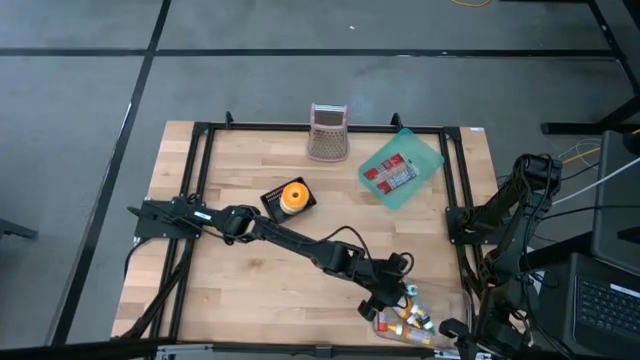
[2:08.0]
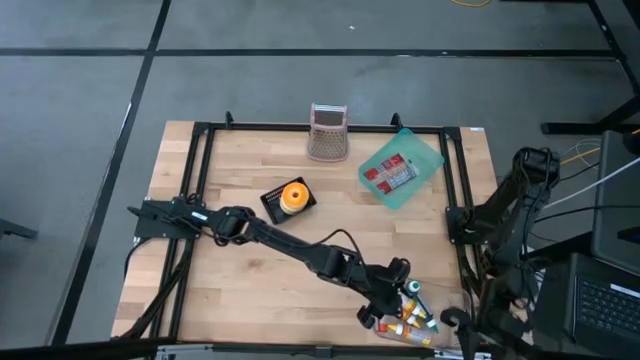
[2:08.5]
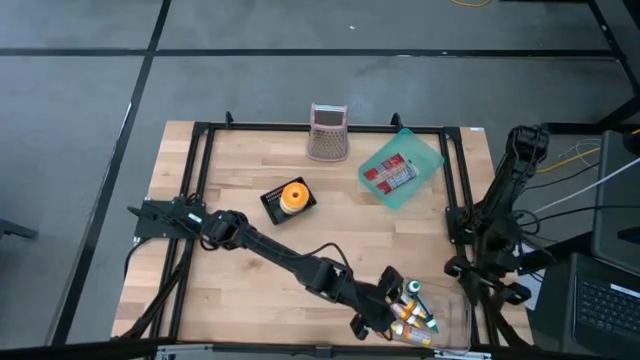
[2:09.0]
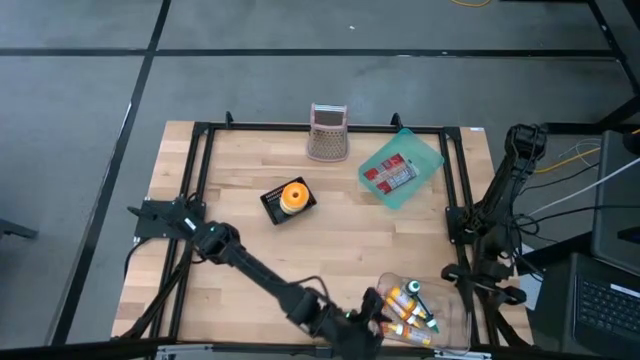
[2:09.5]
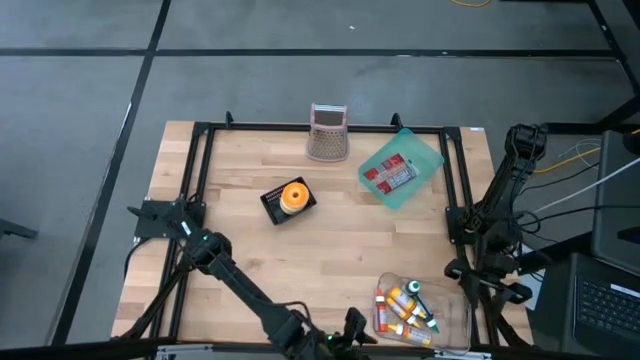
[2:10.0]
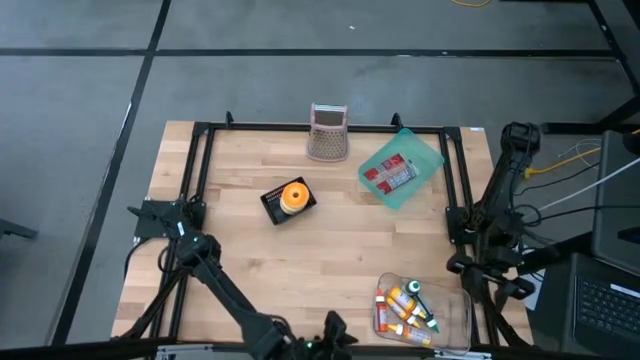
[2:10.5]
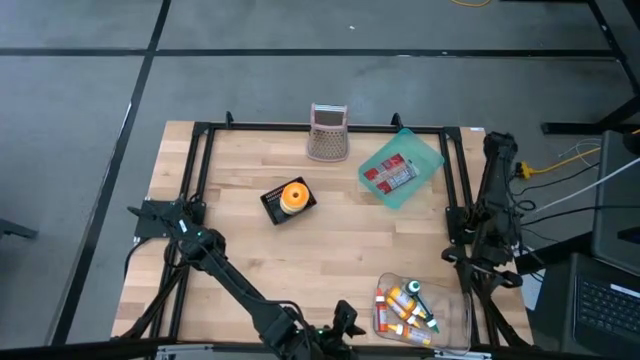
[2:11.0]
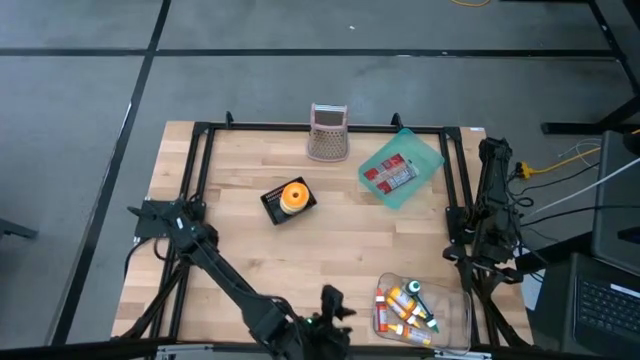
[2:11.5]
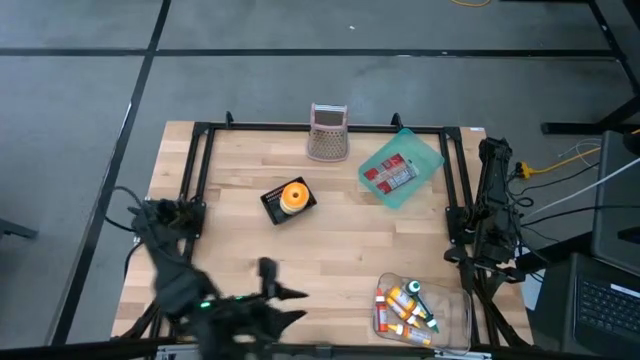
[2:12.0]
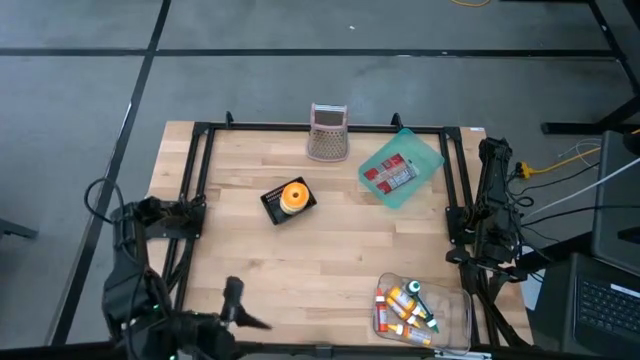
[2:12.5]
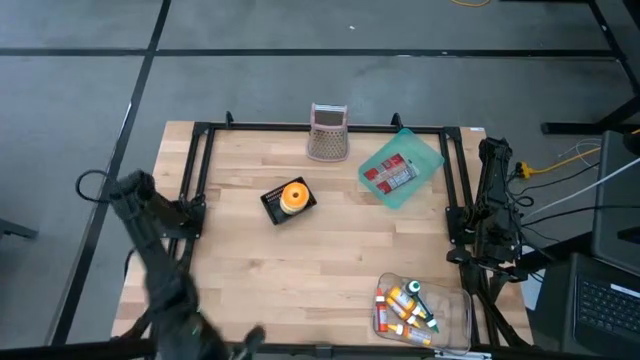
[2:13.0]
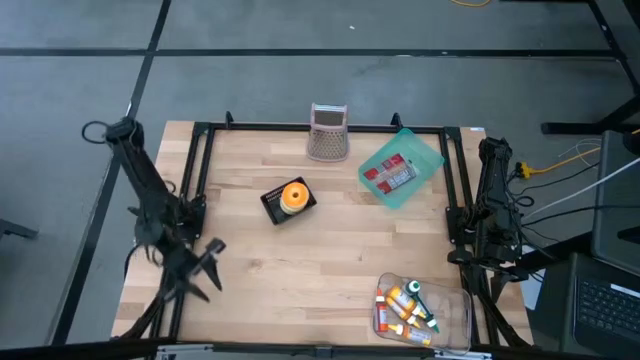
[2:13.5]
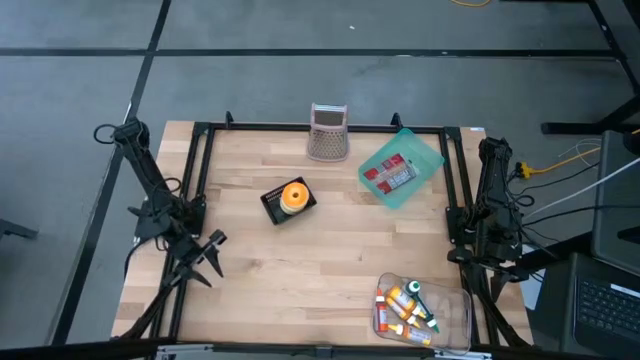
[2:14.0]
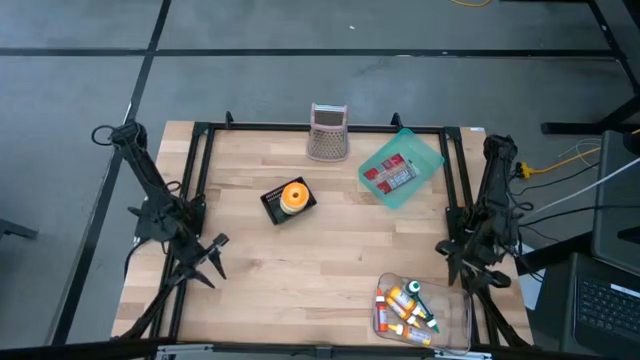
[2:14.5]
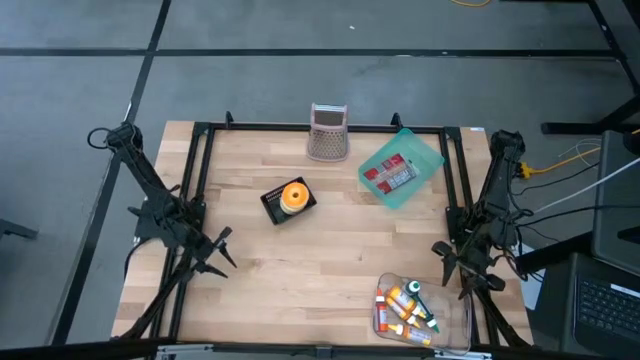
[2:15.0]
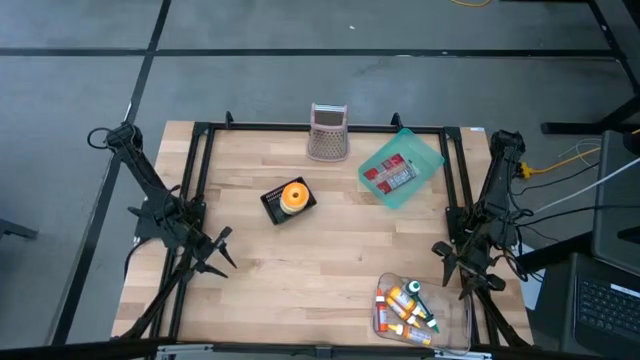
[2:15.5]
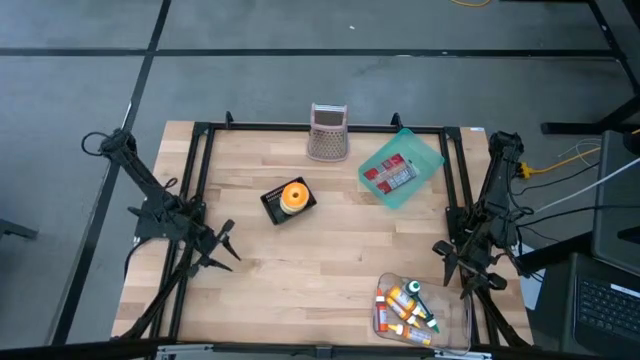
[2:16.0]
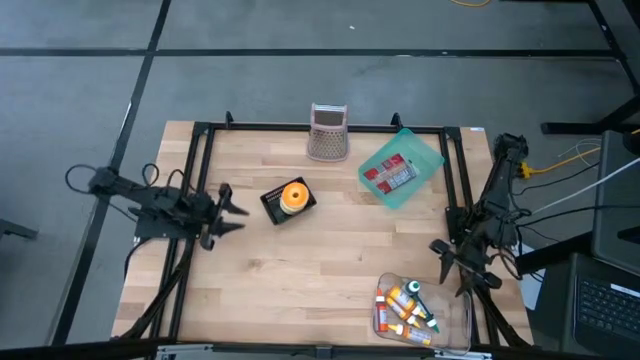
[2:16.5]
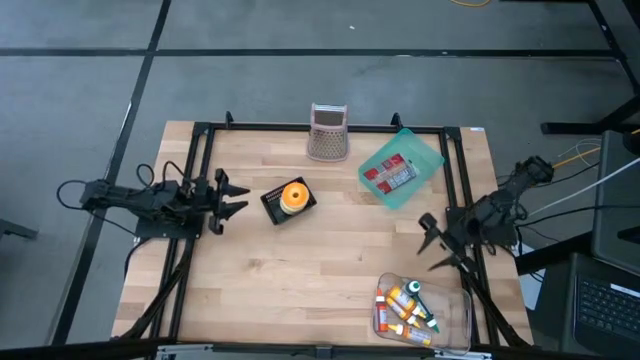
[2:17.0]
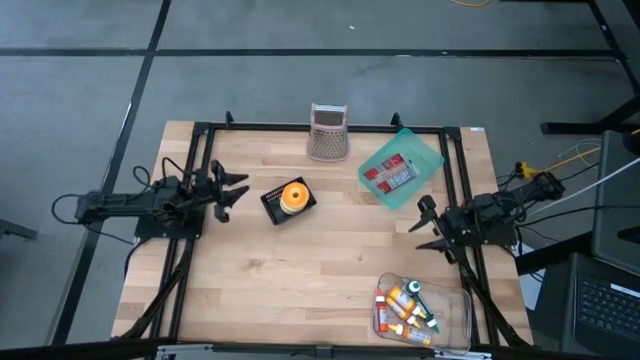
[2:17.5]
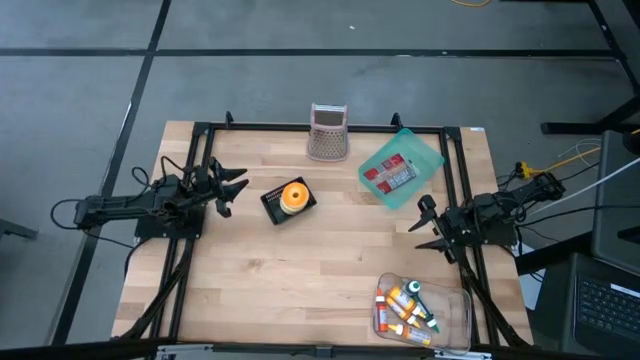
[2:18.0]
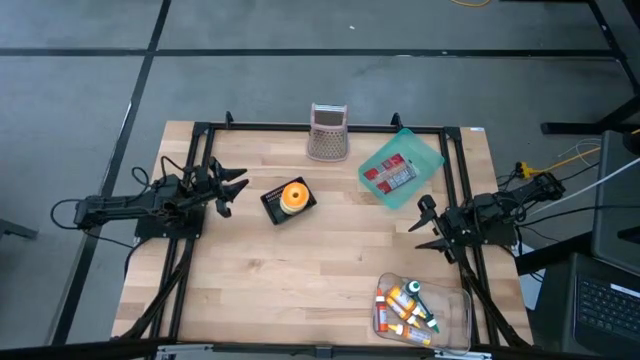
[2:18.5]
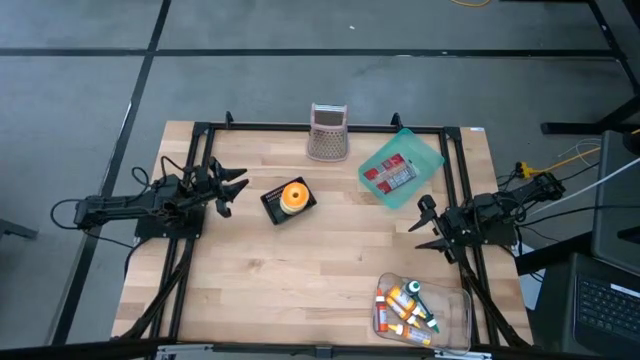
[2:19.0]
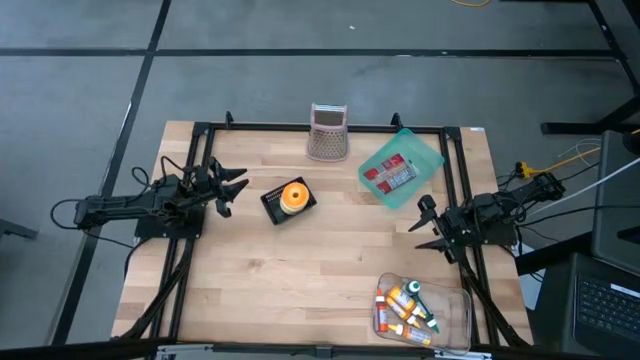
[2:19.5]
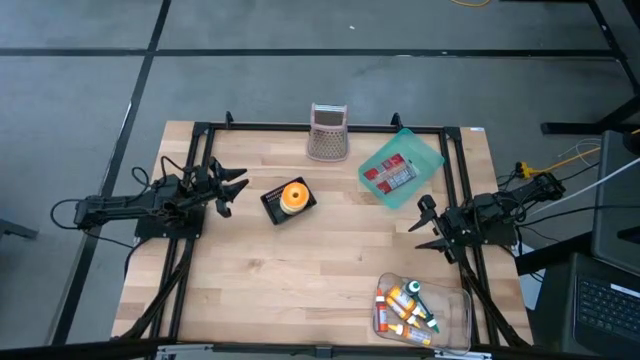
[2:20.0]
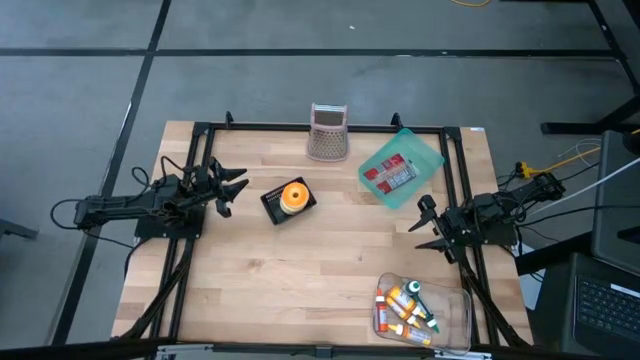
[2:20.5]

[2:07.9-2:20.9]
Task: Pick & Place Food Item
Return to Home Position
